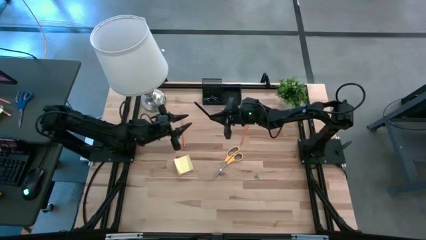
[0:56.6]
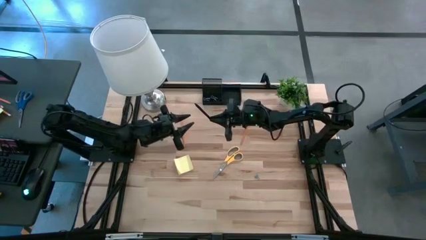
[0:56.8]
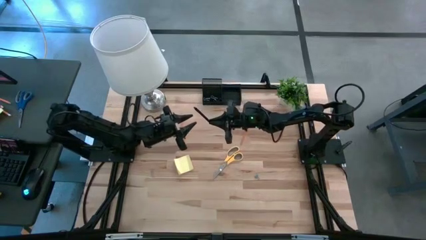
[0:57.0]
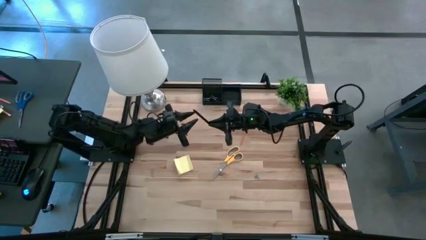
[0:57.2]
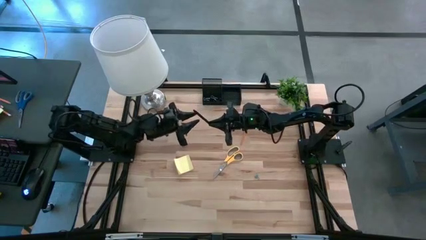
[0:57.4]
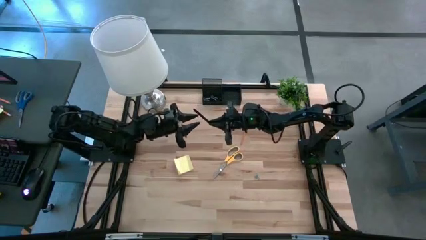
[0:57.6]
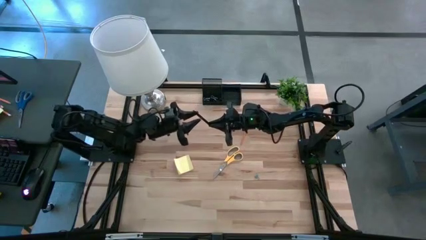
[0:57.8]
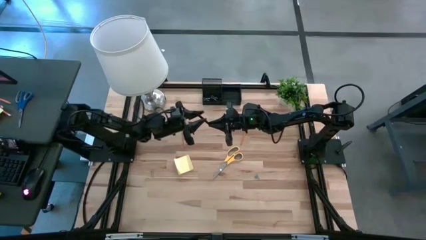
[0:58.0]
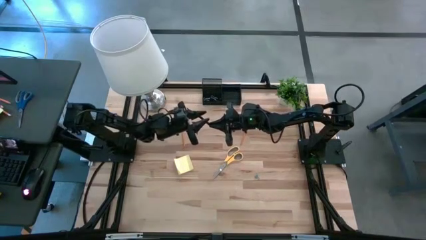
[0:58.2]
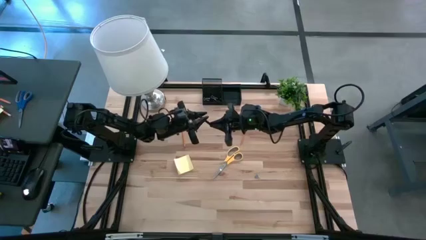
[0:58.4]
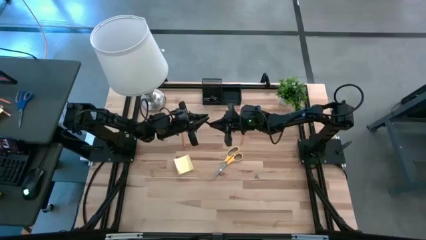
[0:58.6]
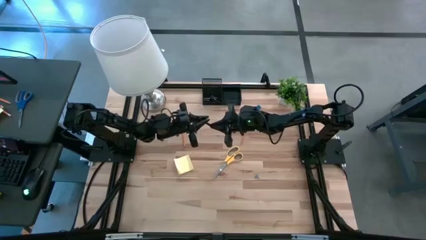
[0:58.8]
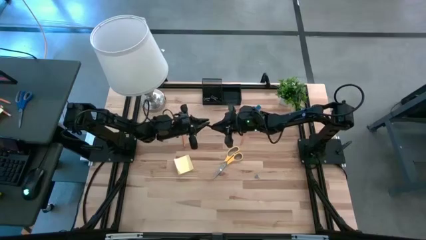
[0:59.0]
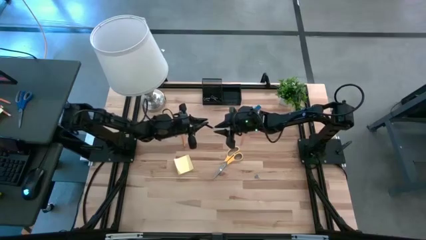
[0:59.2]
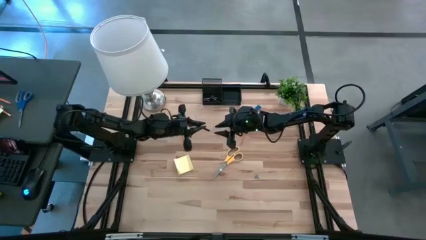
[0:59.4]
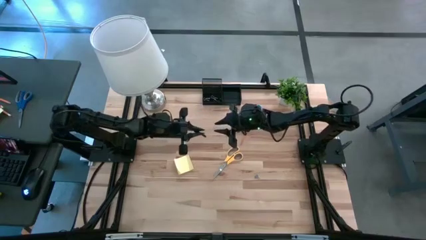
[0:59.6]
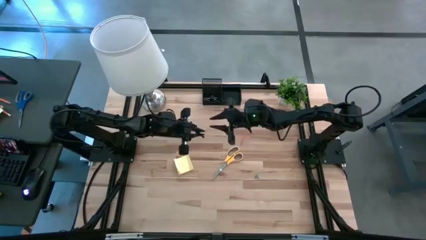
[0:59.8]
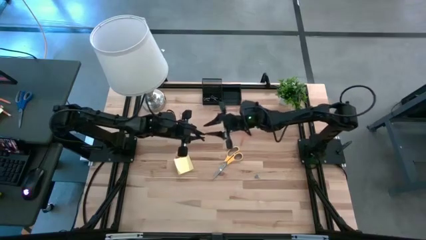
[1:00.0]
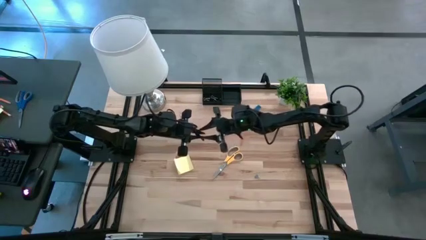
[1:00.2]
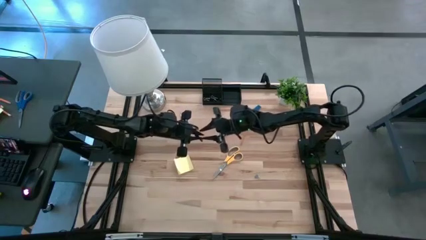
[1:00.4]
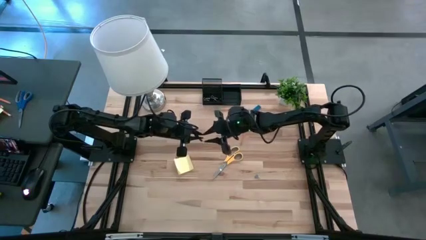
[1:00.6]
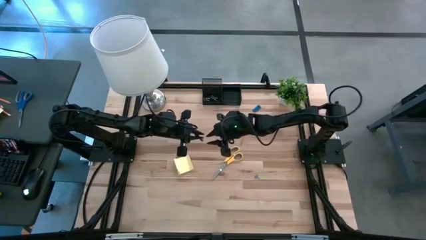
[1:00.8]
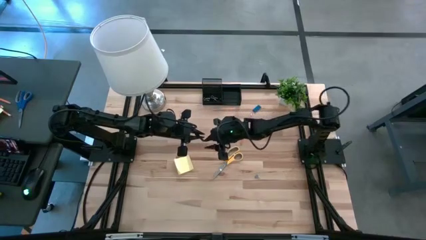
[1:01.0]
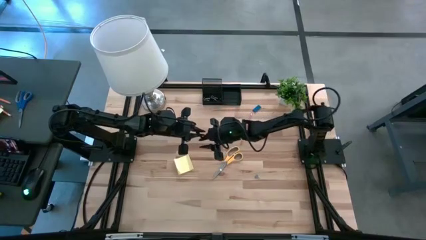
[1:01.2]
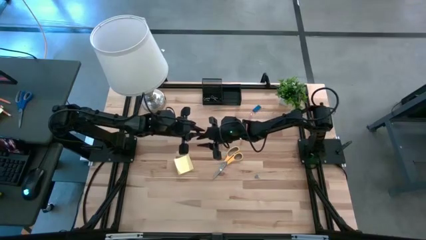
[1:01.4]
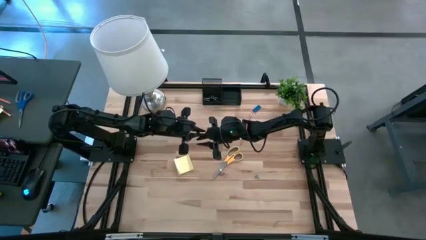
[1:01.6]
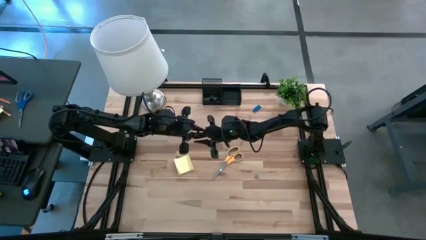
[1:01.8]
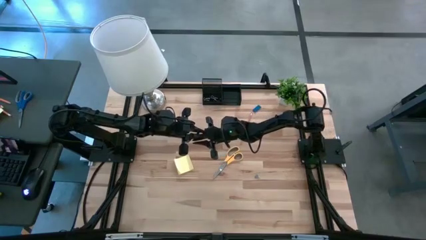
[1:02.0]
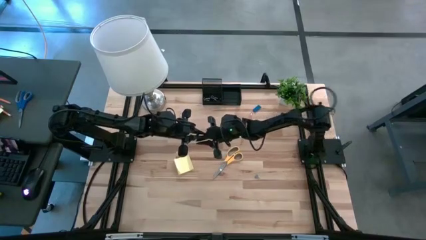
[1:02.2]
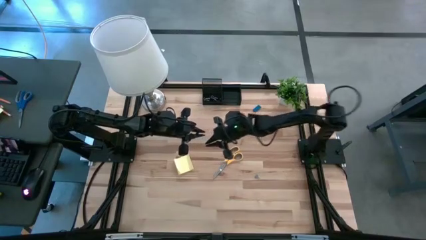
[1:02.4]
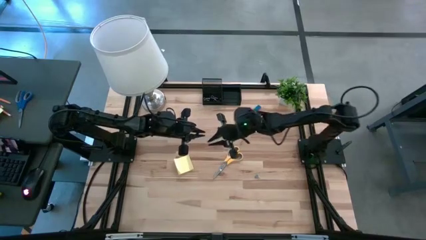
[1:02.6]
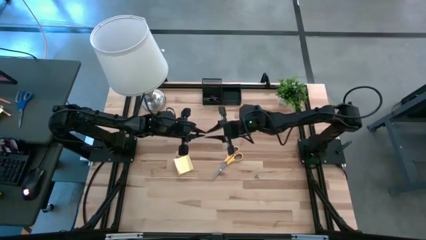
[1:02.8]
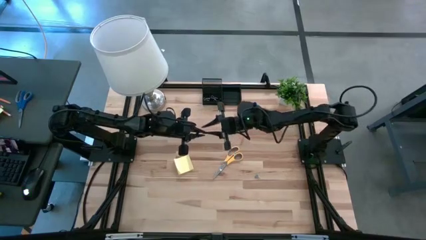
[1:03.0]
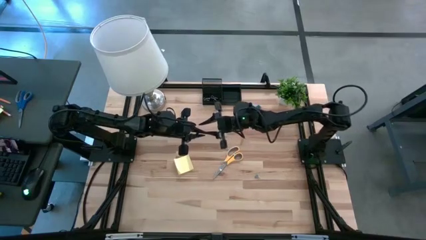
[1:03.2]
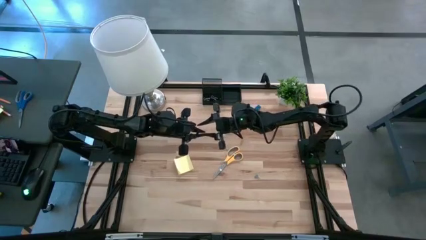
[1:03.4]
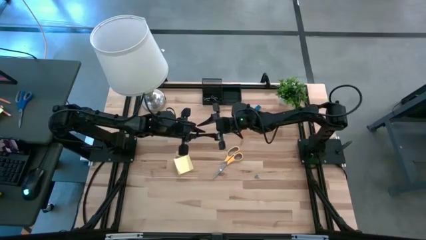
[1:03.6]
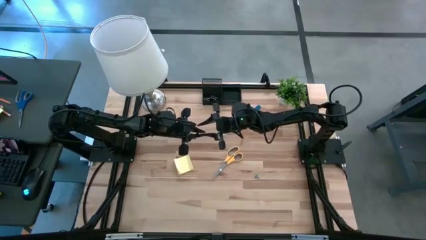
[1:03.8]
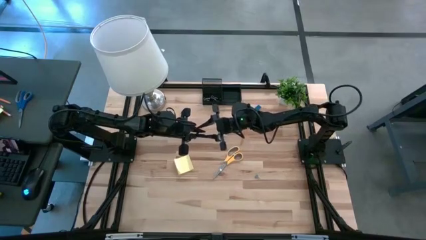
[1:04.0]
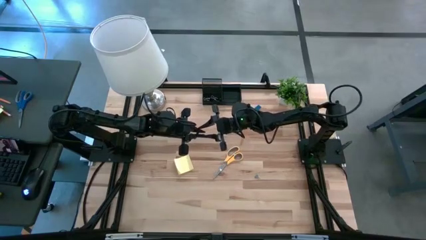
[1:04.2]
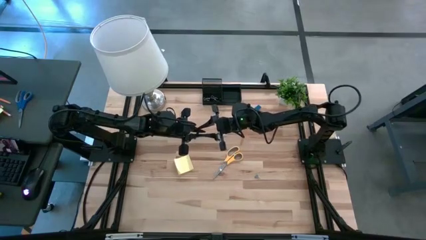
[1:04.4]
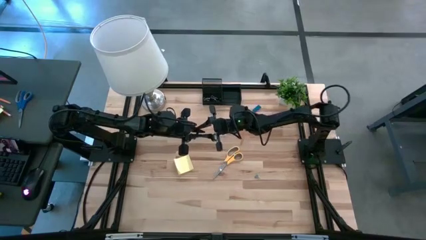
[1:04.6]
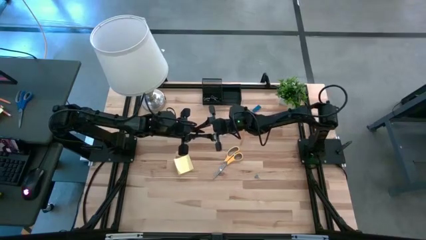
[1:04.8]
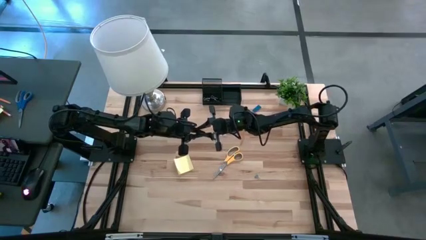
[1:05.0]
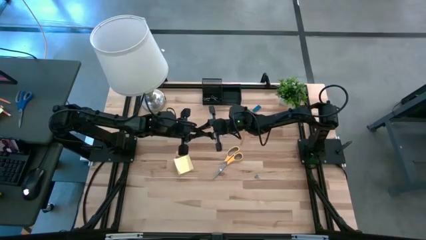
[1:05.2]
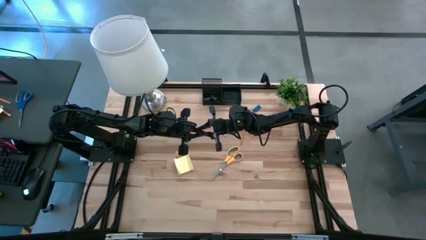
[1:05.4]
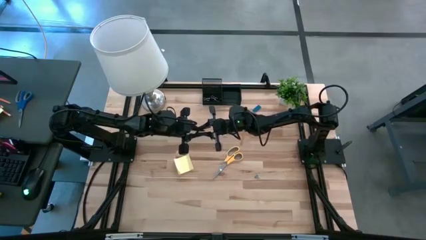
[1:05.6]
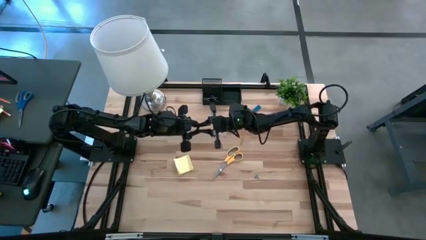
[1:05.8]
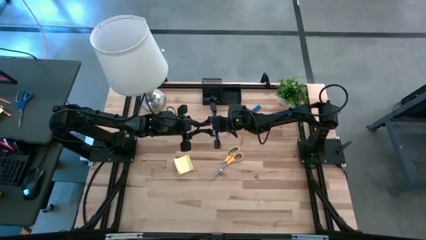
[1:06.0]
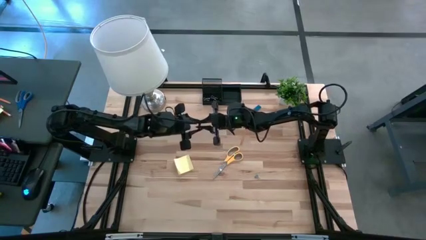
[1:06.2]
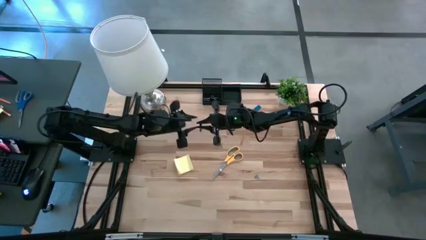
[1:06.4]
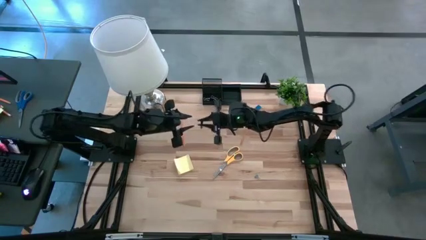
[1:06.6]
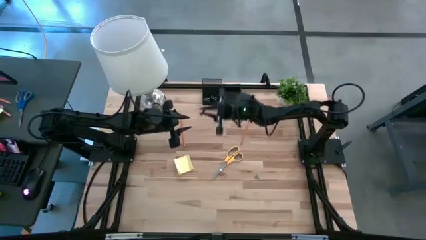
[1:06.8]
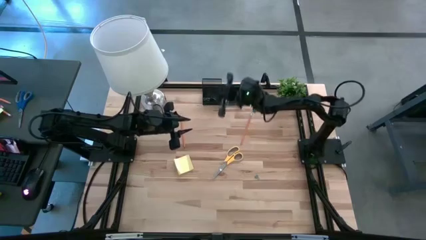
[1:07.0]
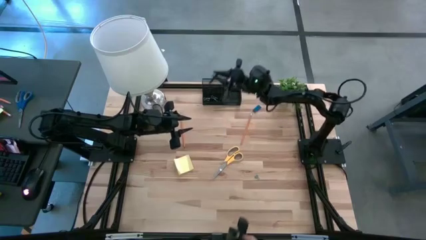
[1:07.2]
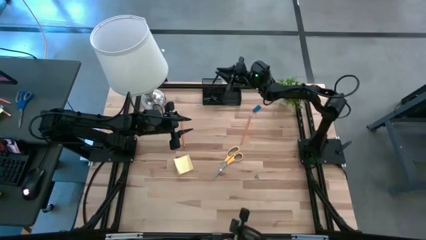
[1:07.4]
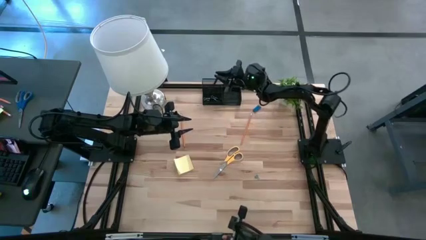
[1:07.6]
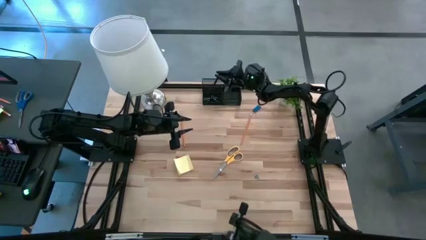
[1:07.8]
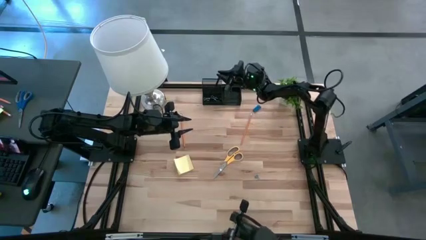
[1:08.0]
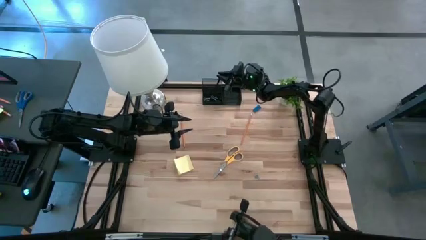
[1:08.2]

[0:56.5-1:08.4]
Task: Pick and place office supplies into organizer
Put the pen into the desk organizer

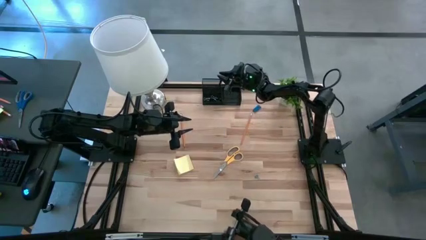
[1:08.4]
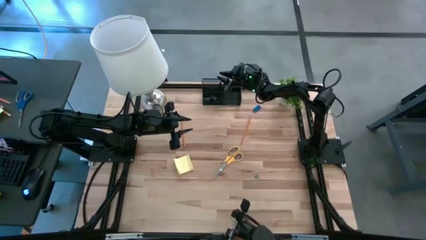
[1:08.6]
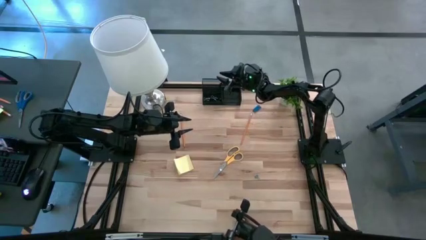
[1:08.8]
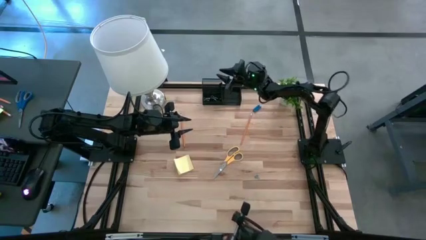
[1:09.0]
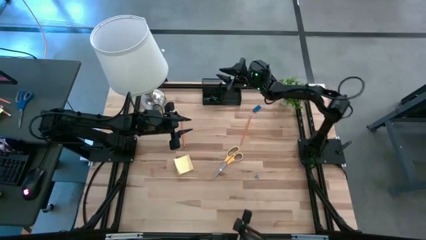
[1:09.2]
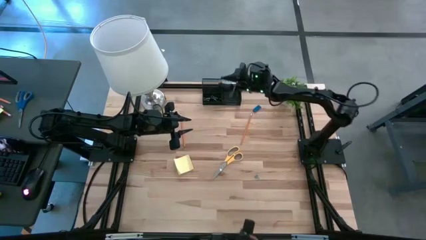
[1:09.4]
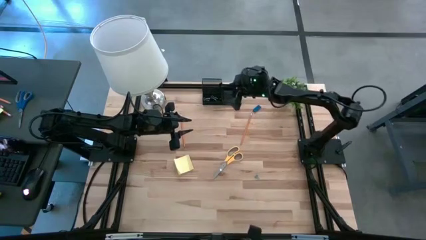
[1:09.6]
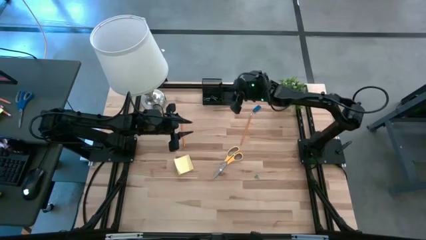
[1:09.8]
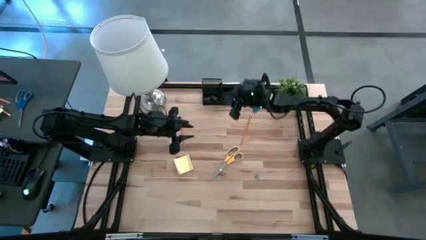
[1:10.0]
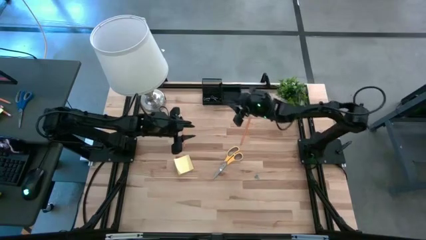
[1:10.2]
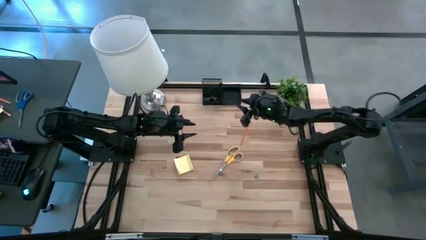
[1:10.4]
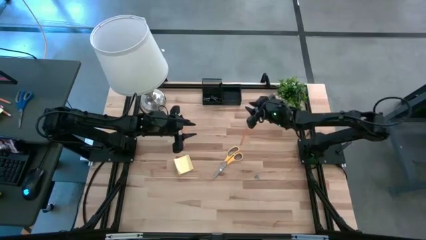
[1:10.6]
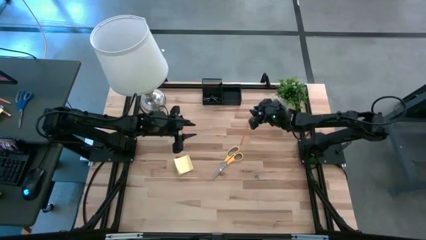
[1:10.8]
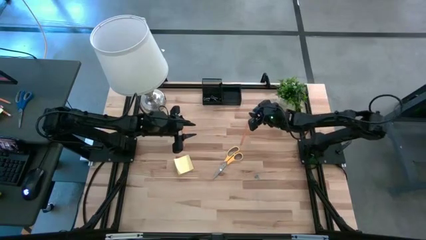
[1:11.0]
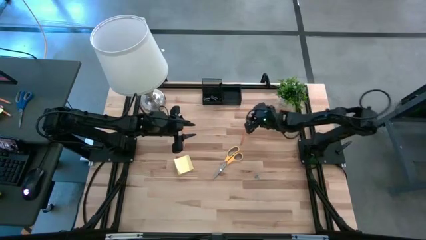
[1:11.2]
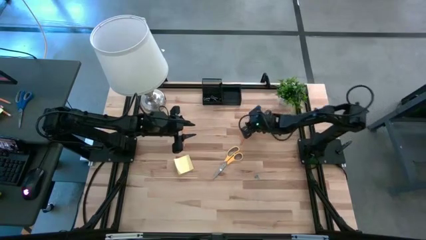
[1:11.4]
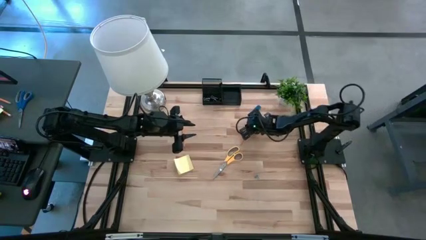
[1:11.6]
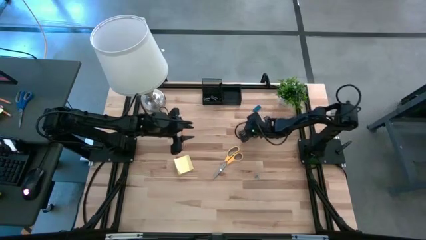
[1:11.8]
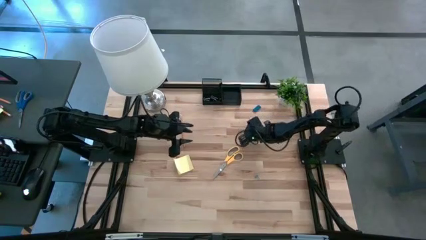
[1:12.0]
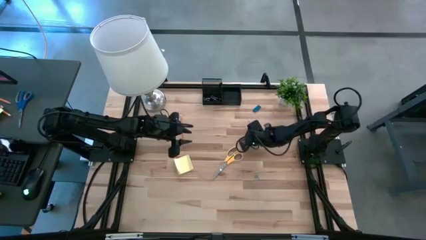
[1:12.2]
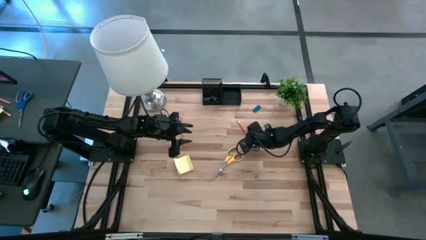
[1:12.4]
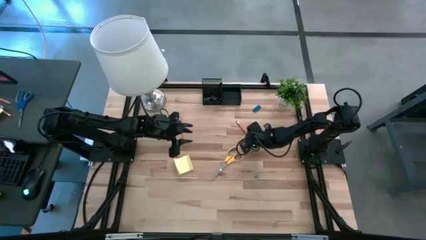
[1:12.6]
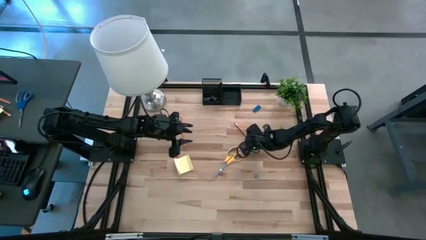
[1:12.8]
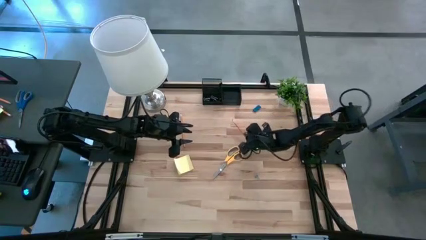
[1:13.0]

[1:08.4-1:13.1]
Put the right pencil into the desk organizer
